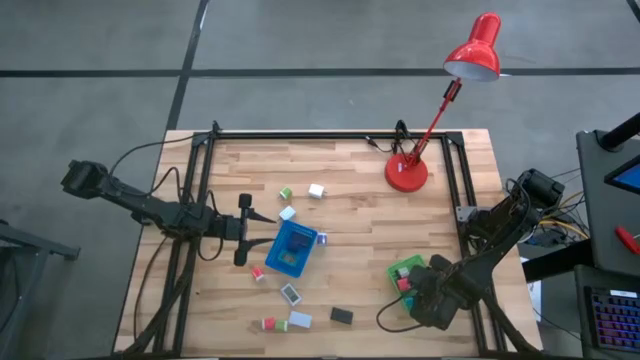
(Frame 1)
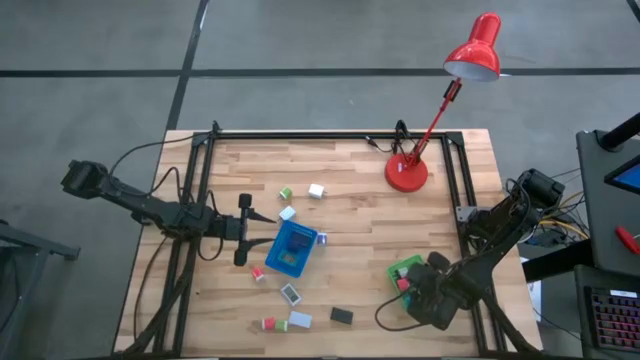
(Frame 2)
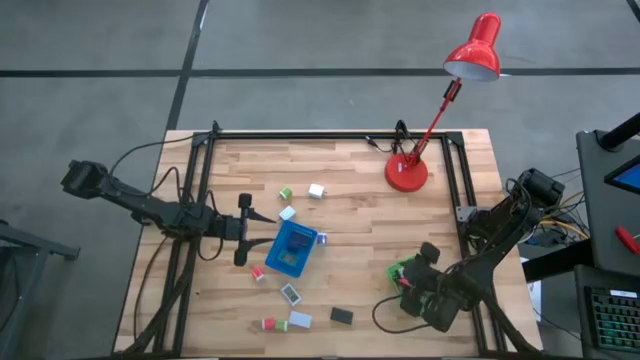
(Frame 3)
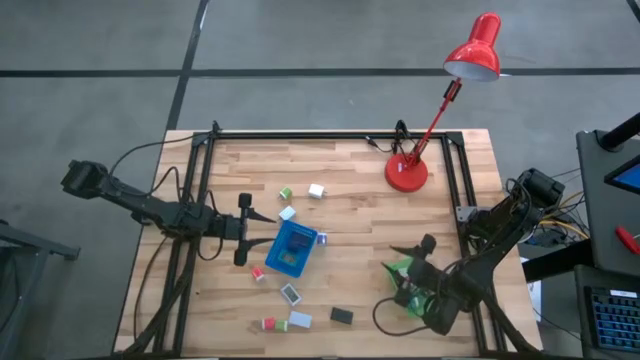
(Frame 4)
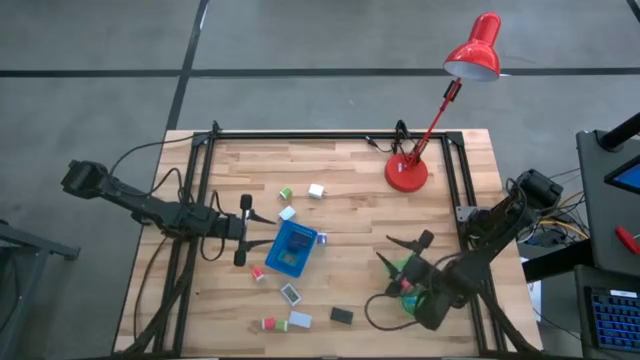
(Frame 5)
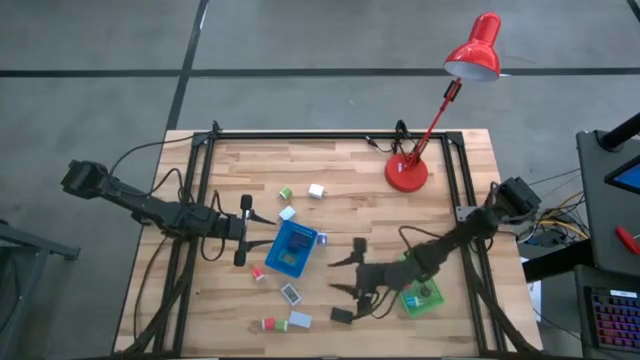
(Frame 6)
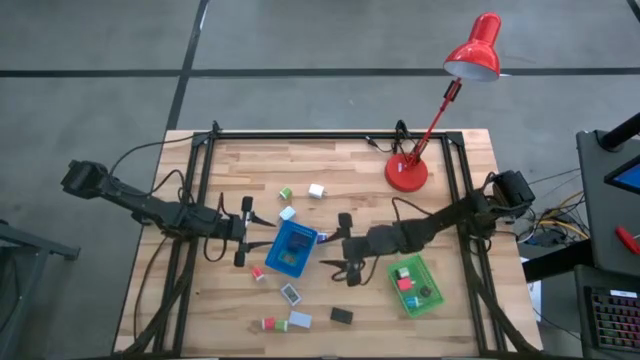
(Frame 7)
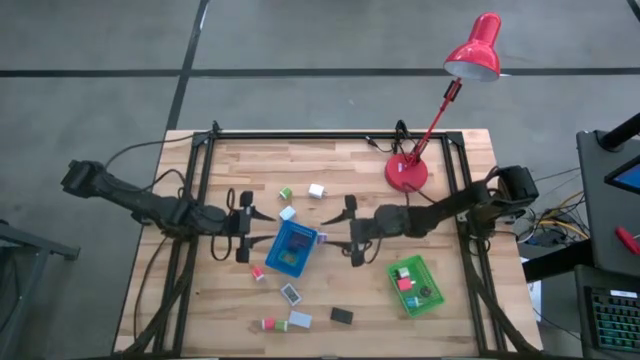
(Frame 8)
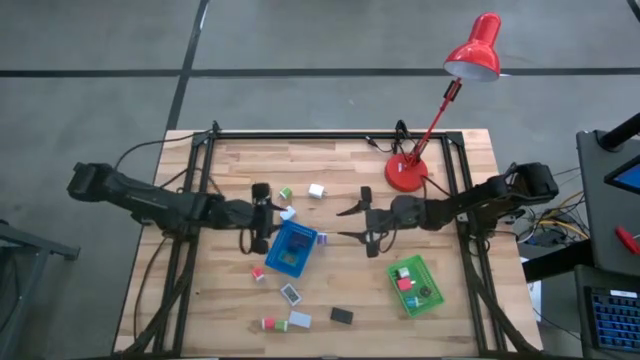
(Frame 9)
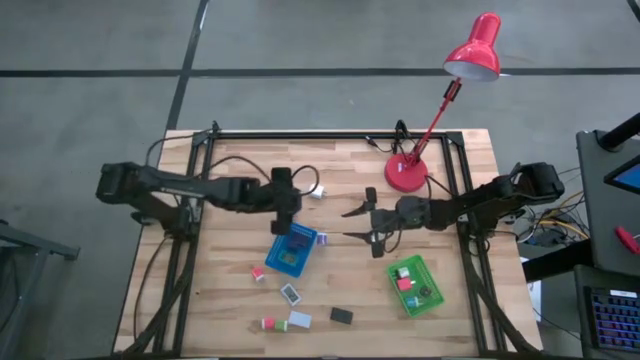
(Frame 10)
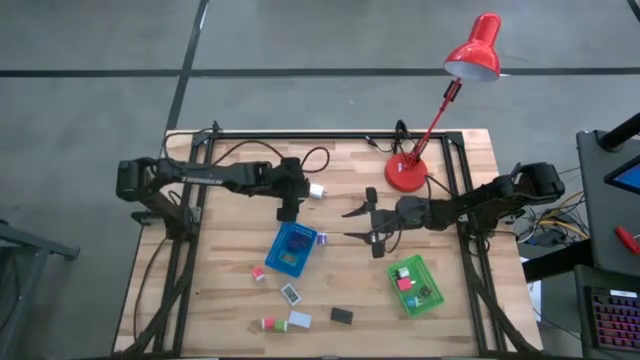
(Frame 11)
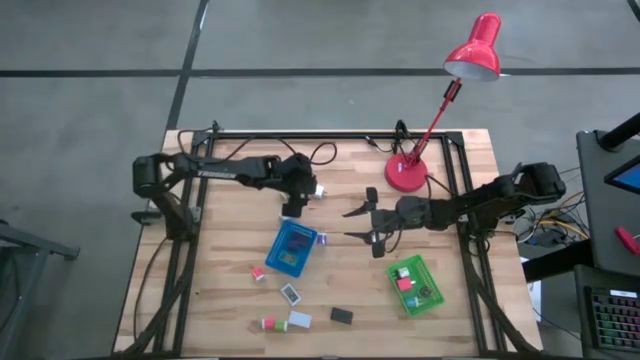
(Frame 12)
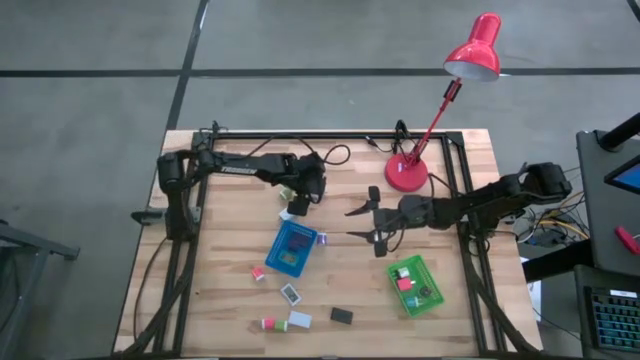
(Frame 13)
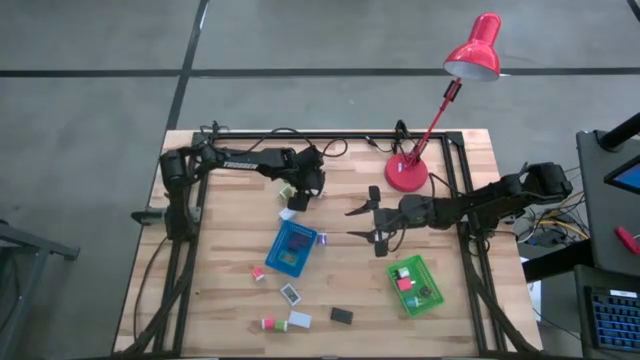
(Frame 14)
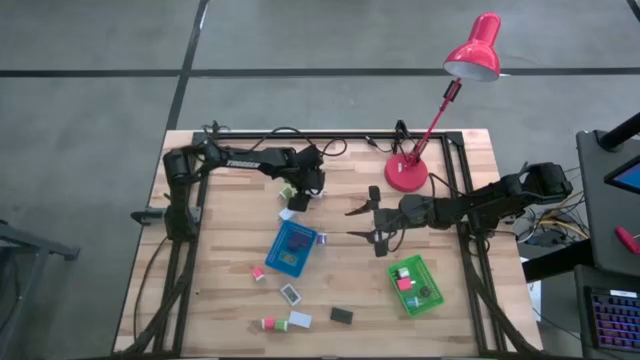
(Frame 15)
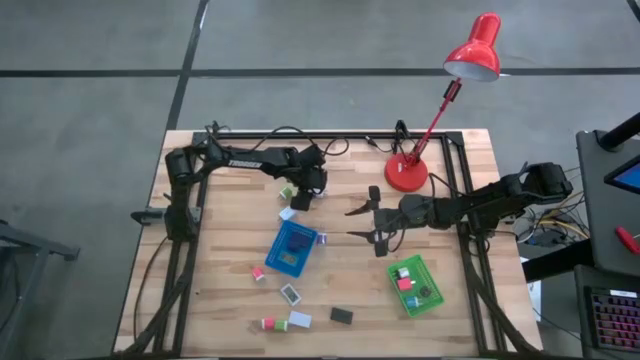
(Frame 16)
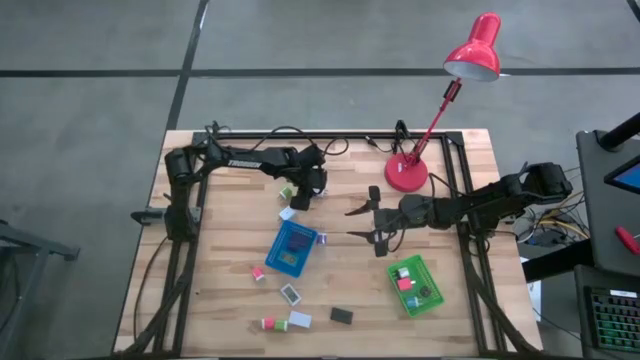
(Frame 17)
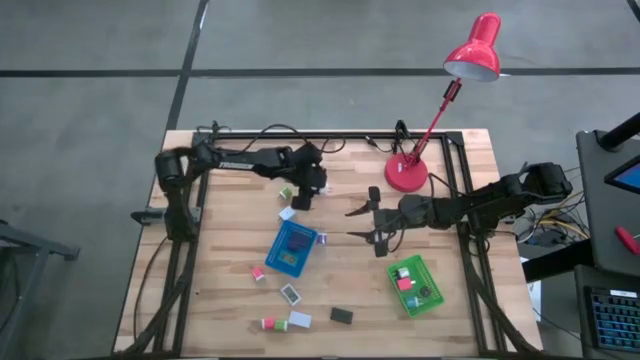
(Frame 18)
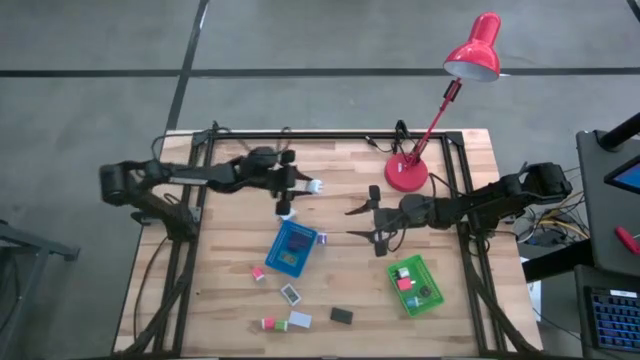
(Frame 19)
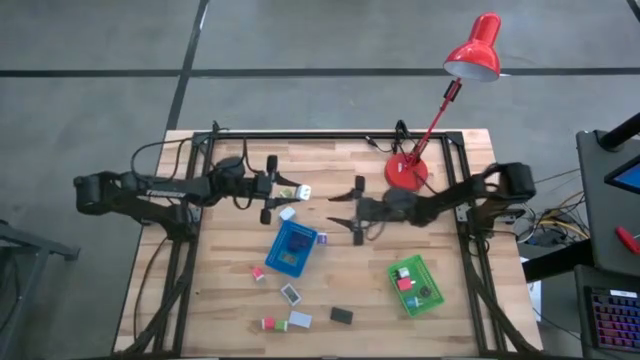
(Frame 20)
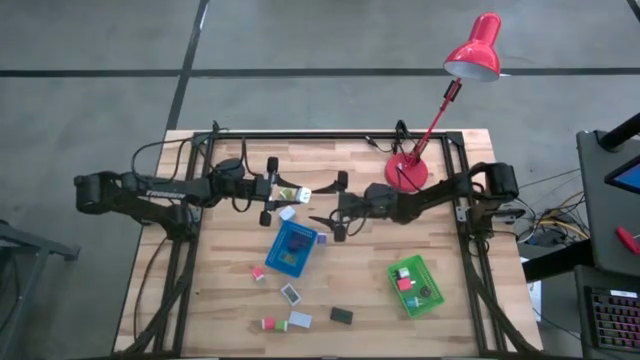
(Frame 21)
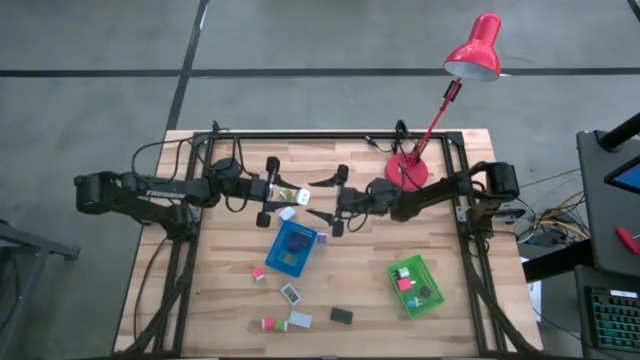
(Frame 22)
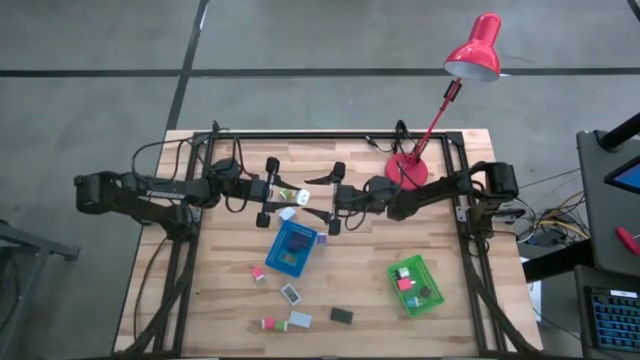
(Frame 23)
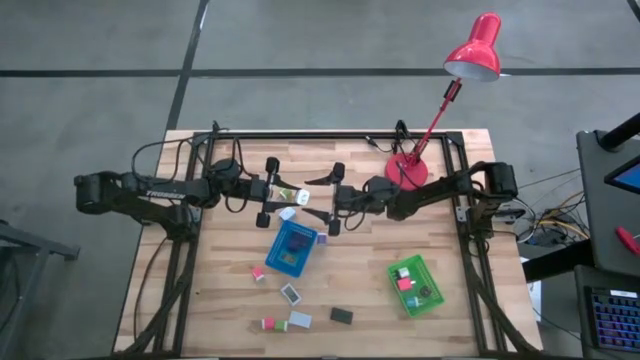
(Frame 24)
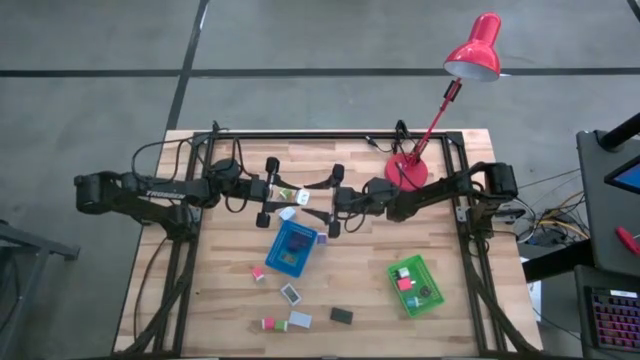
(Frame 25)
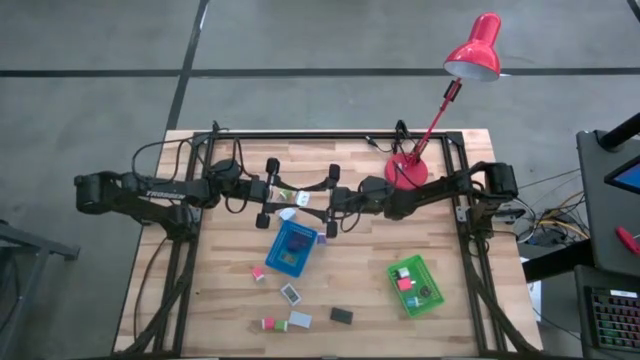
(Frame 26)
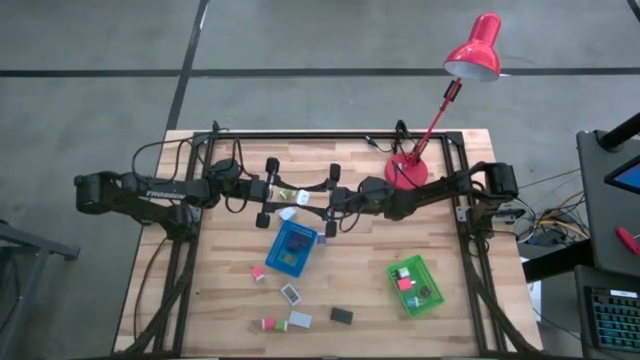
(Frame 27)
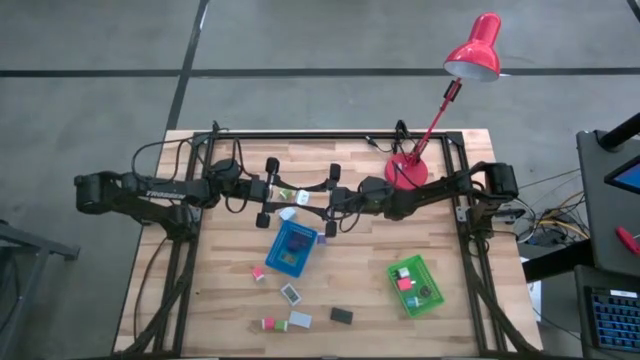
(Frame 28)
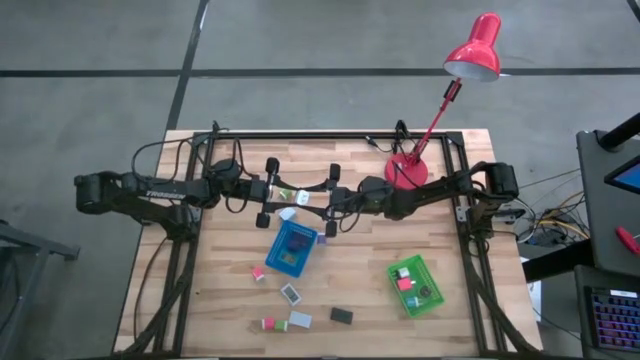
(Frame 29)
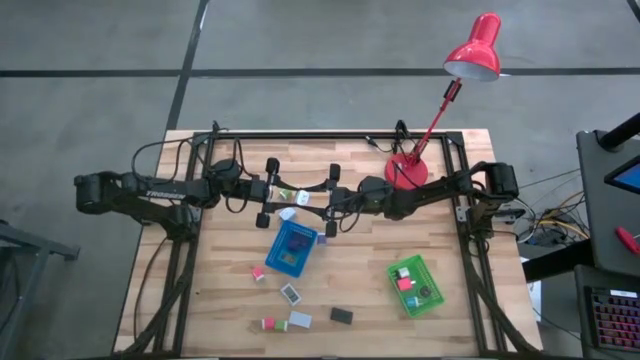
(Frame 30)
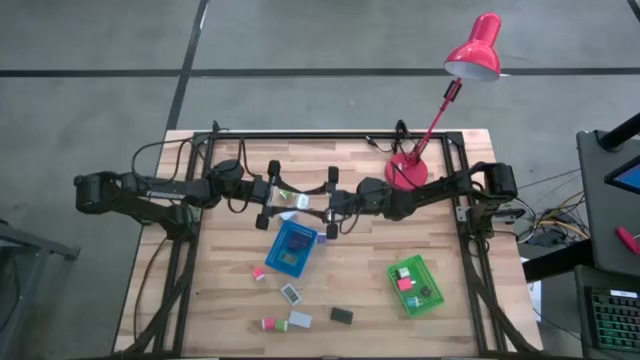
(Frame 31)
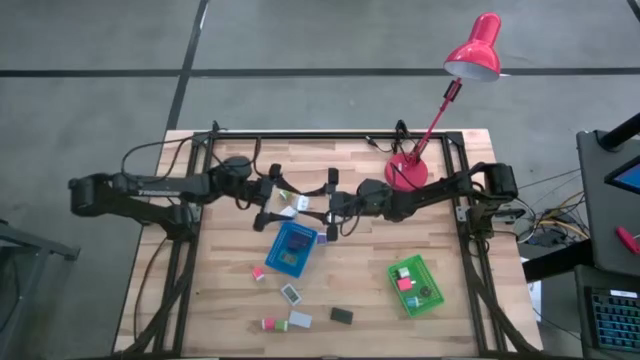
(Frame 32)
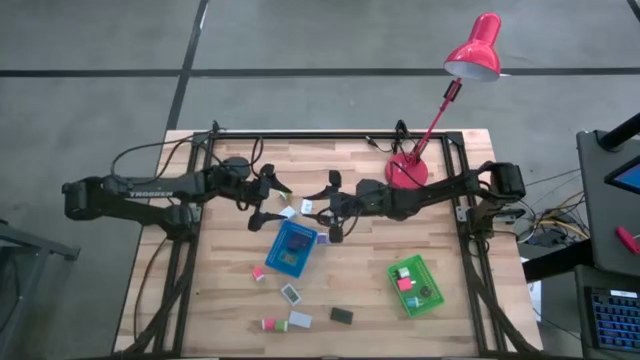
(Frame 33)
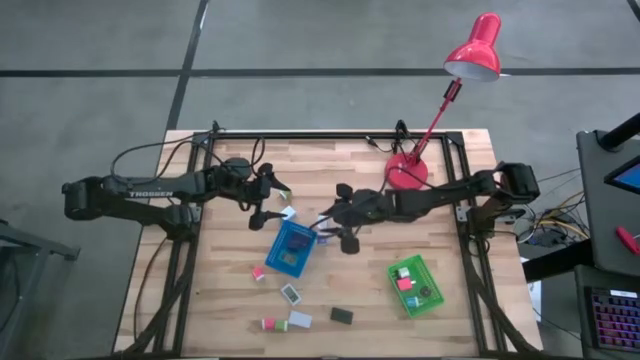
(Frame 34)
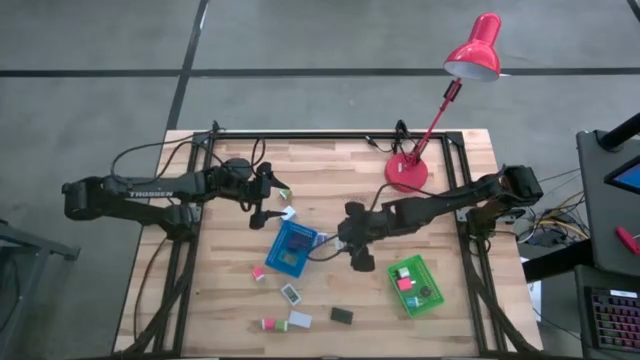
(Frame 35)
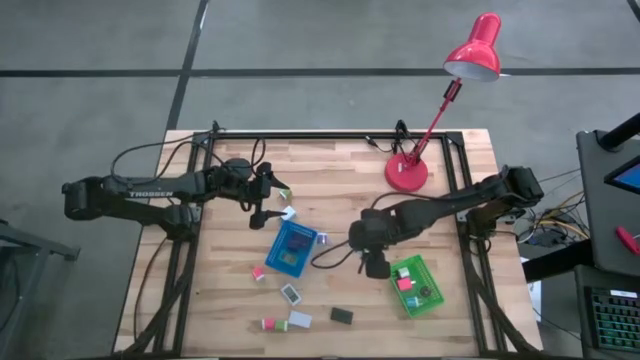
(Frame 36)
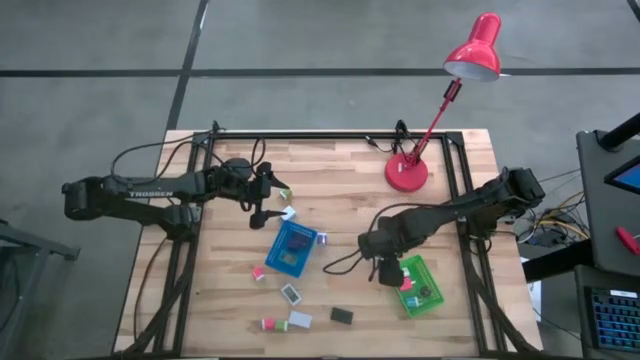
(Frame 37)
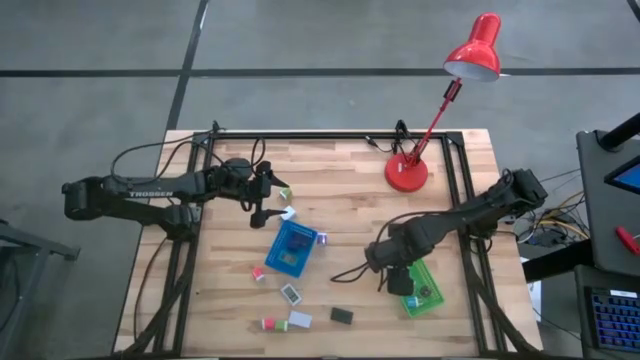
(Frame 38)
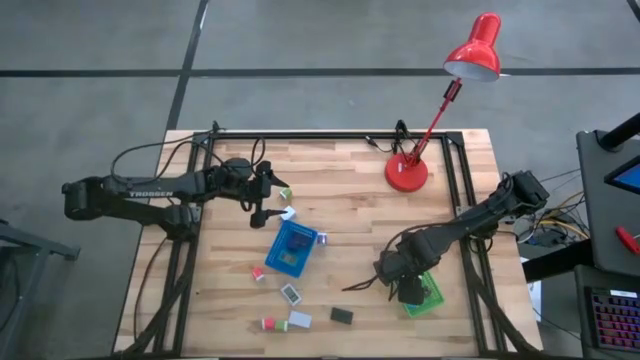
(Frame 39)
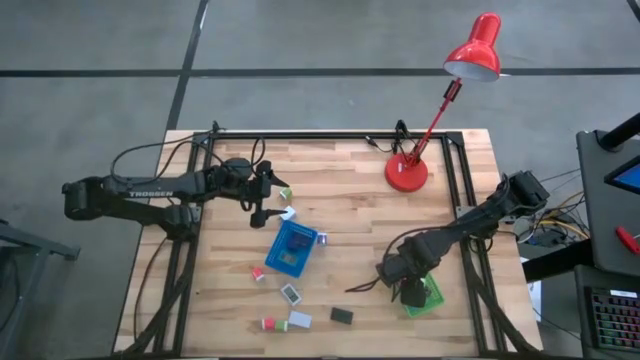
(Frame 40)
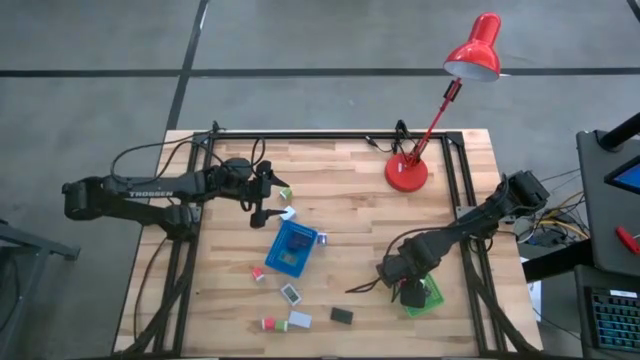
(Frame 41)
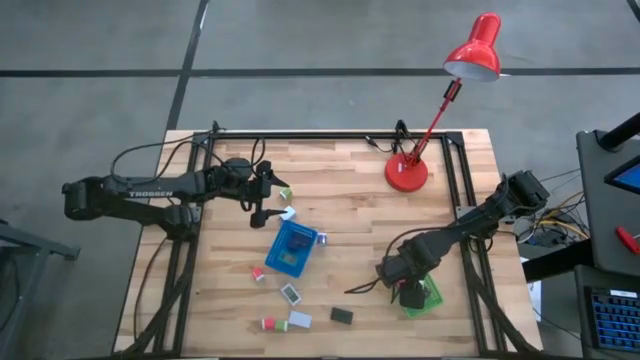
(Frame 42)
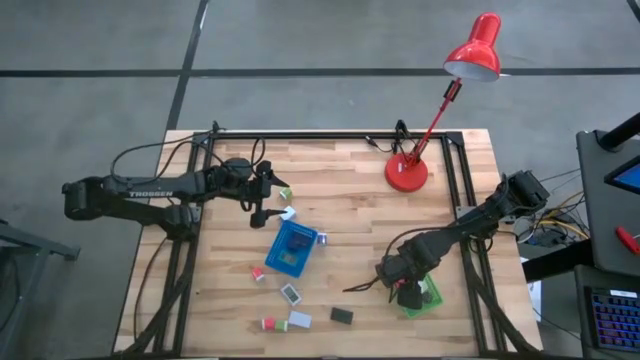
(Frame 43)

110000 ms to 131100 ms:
Task: Pick & Place Office items
Put the top white charger adapter into the green bin
